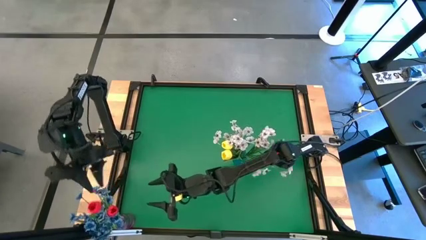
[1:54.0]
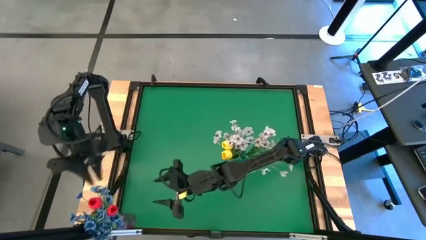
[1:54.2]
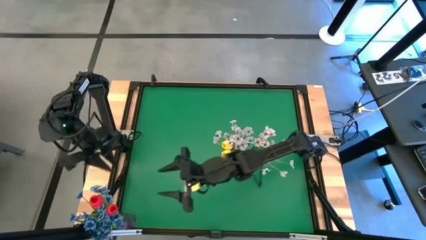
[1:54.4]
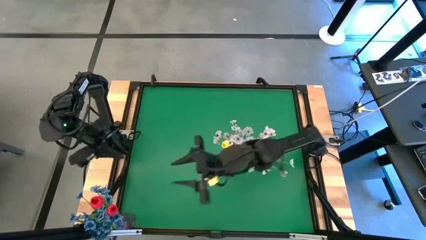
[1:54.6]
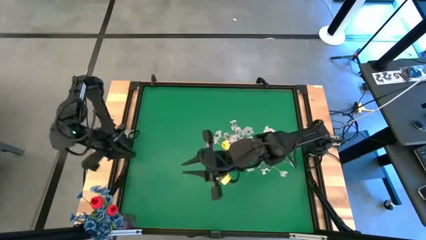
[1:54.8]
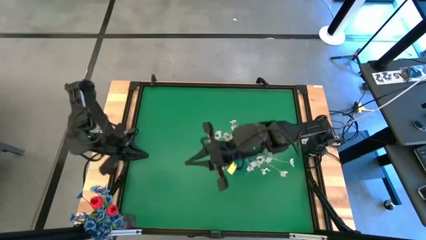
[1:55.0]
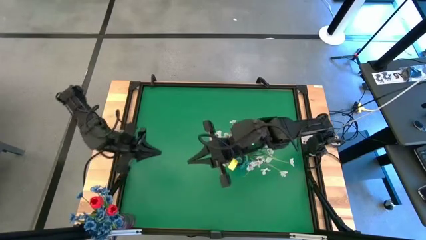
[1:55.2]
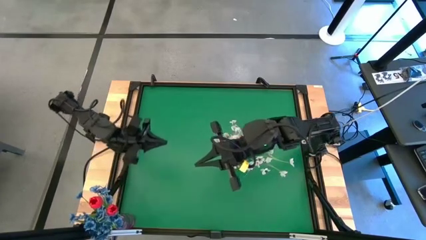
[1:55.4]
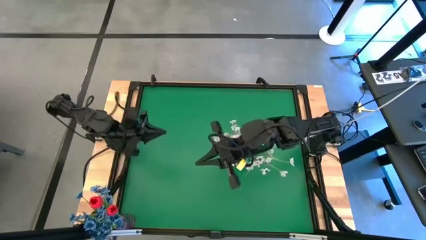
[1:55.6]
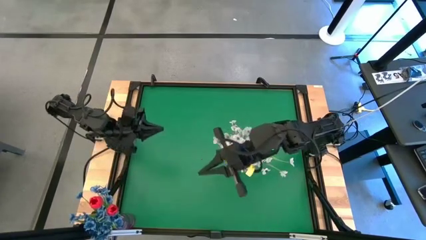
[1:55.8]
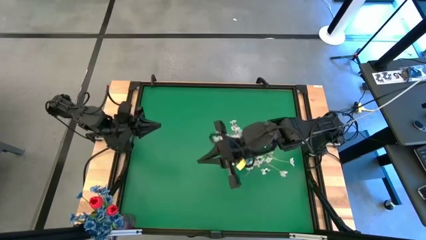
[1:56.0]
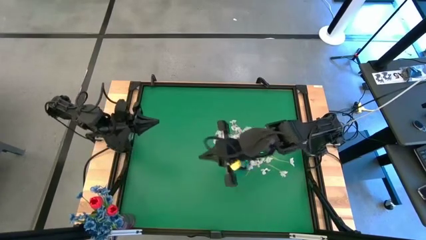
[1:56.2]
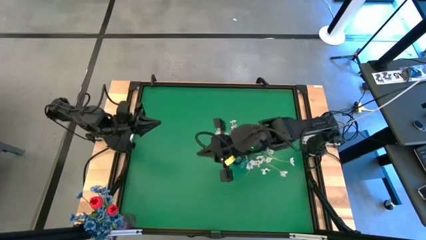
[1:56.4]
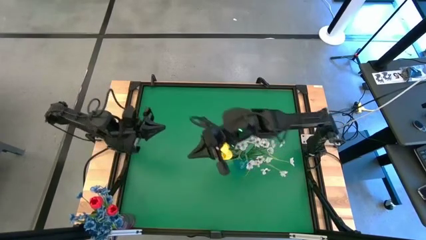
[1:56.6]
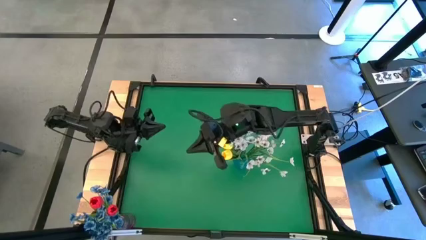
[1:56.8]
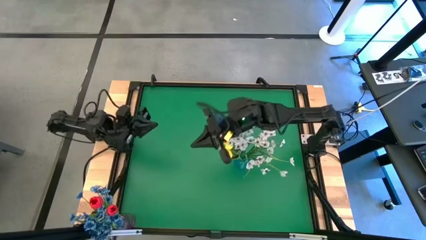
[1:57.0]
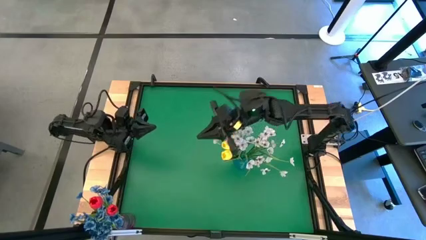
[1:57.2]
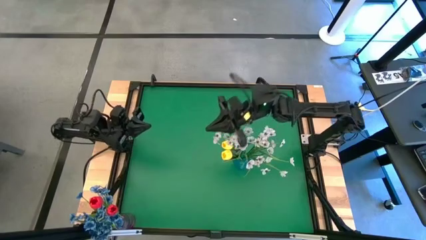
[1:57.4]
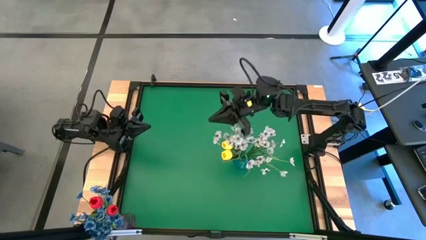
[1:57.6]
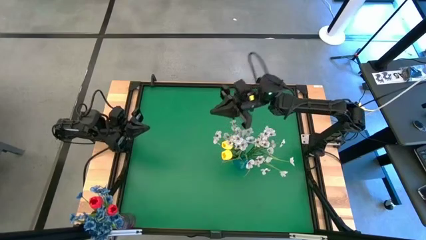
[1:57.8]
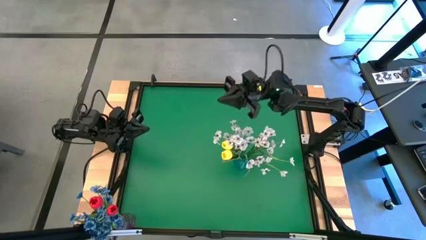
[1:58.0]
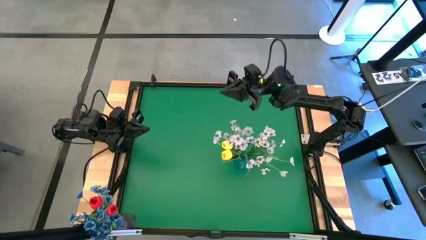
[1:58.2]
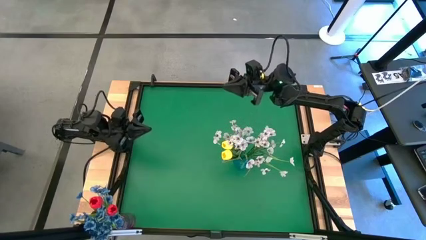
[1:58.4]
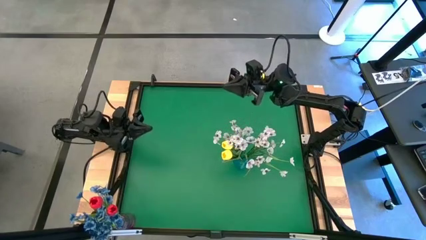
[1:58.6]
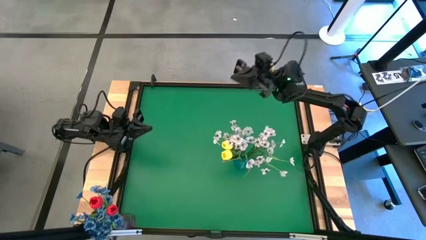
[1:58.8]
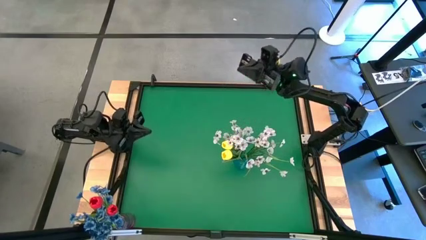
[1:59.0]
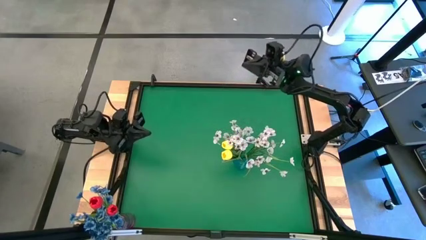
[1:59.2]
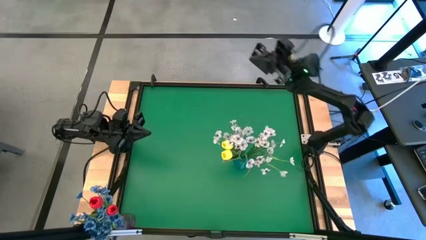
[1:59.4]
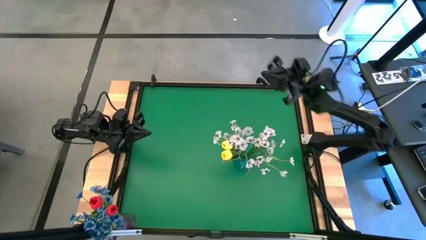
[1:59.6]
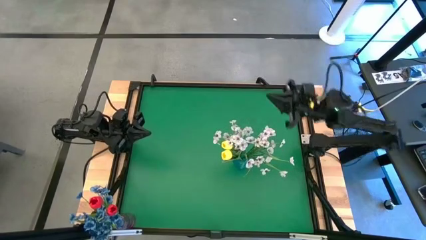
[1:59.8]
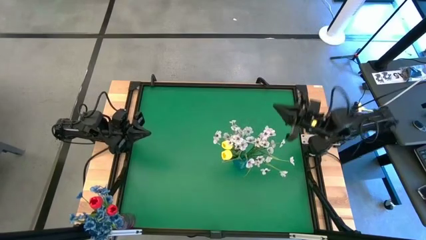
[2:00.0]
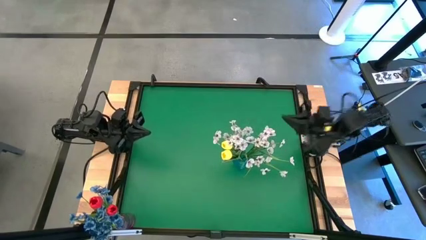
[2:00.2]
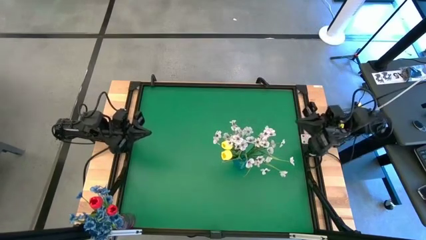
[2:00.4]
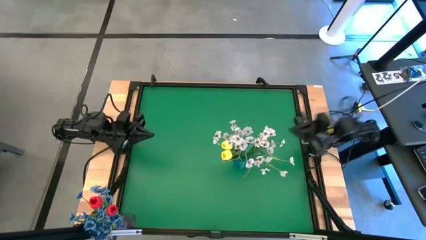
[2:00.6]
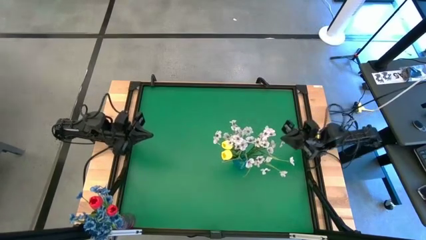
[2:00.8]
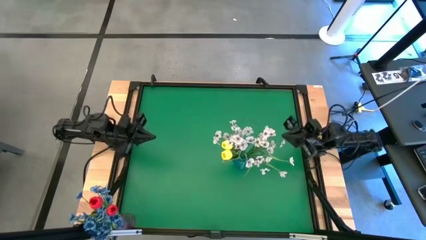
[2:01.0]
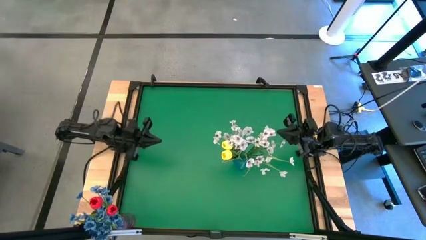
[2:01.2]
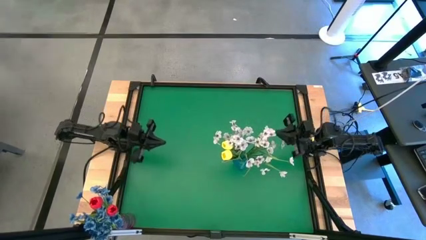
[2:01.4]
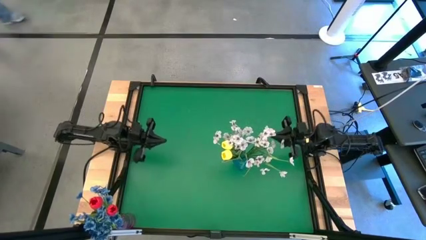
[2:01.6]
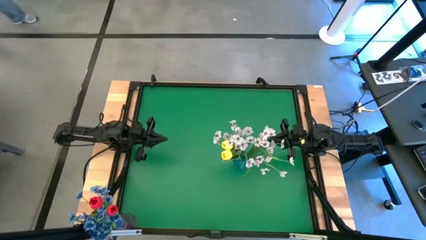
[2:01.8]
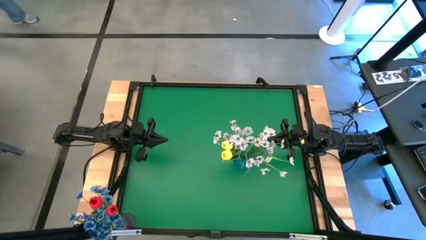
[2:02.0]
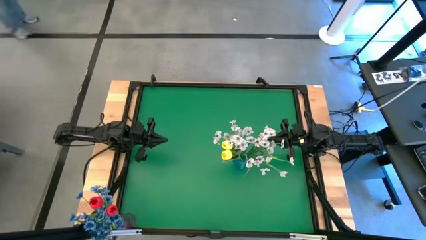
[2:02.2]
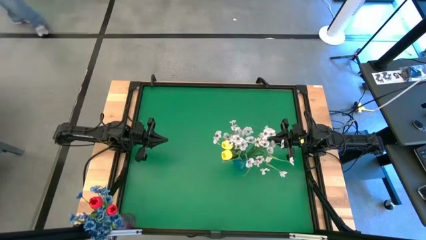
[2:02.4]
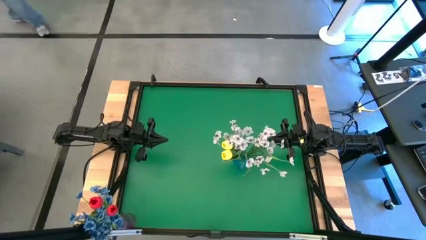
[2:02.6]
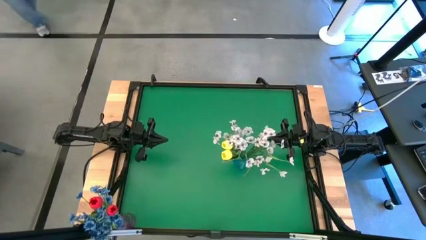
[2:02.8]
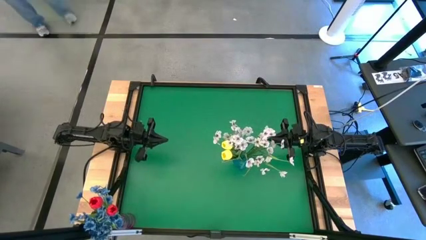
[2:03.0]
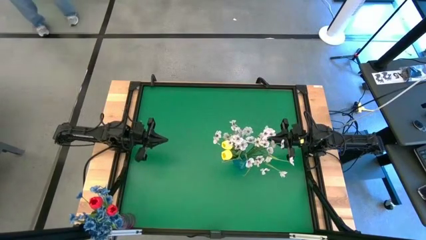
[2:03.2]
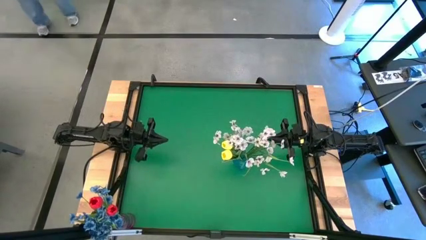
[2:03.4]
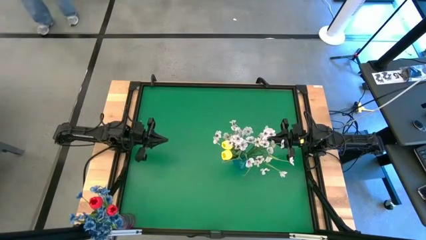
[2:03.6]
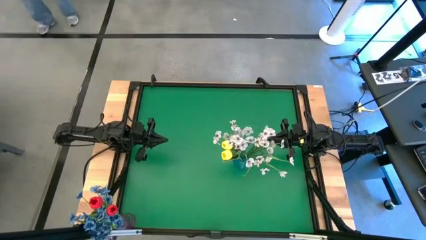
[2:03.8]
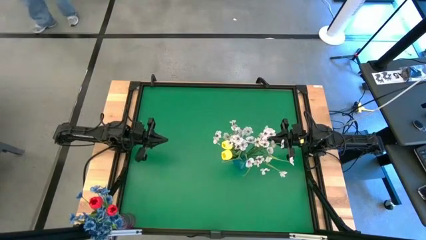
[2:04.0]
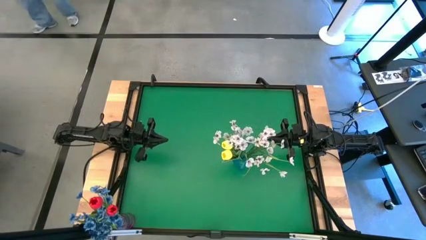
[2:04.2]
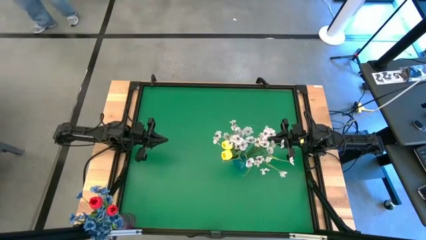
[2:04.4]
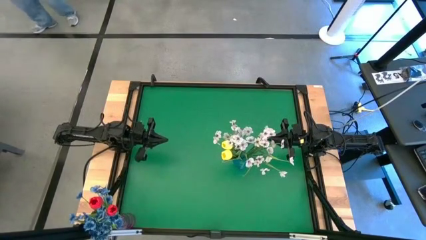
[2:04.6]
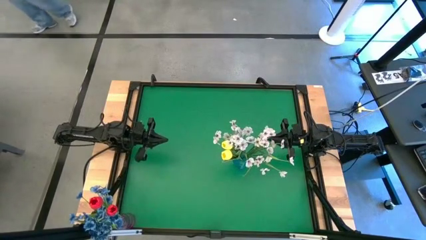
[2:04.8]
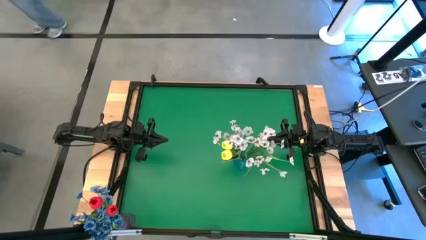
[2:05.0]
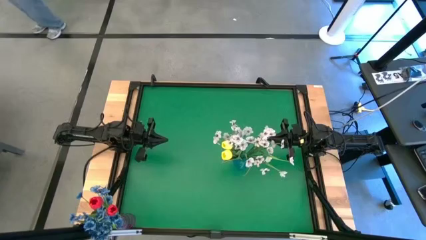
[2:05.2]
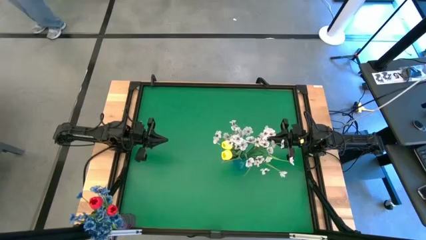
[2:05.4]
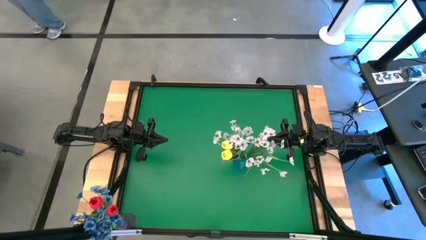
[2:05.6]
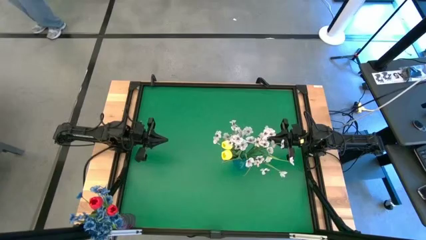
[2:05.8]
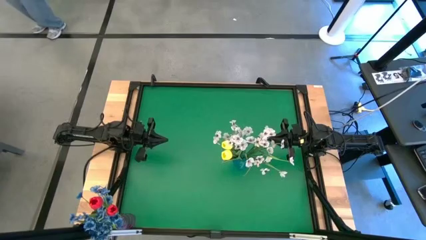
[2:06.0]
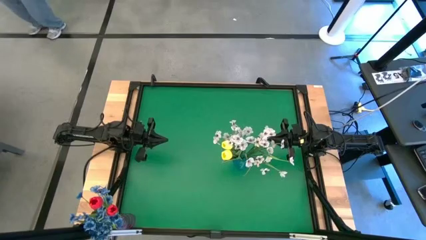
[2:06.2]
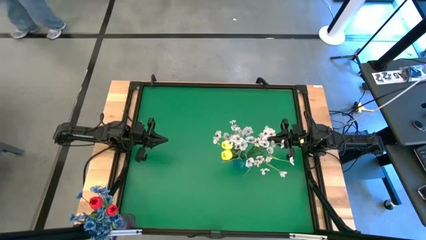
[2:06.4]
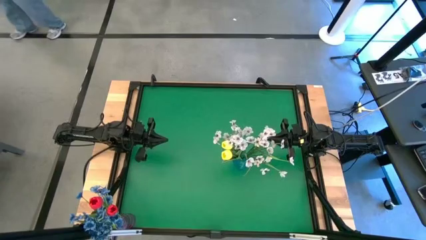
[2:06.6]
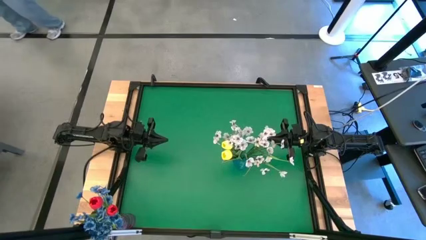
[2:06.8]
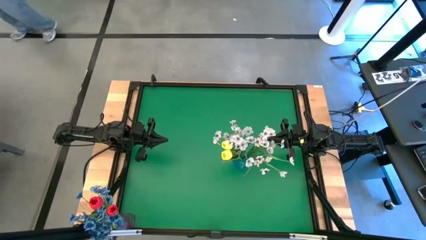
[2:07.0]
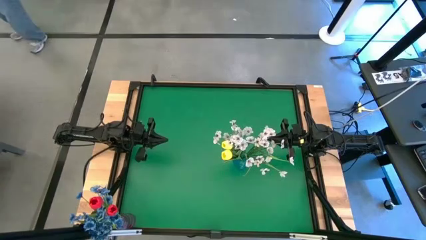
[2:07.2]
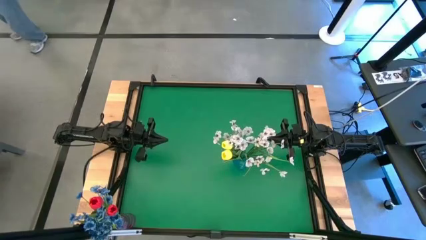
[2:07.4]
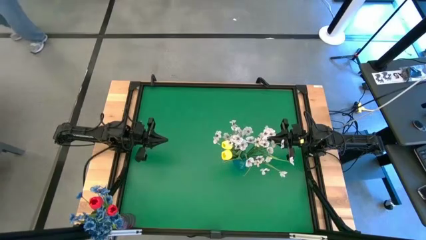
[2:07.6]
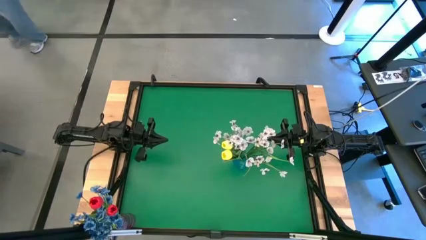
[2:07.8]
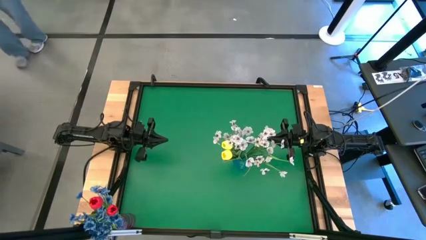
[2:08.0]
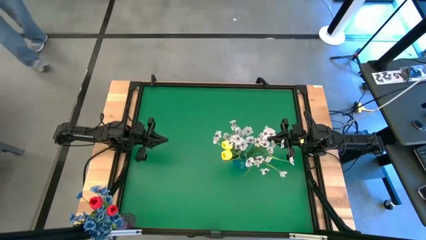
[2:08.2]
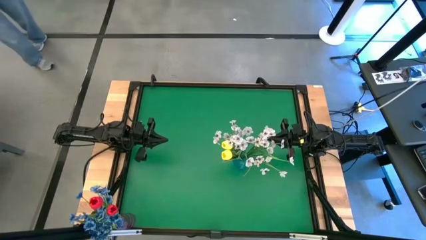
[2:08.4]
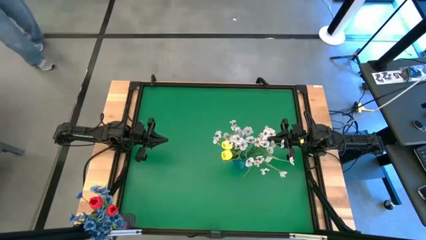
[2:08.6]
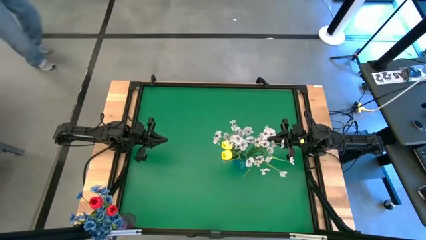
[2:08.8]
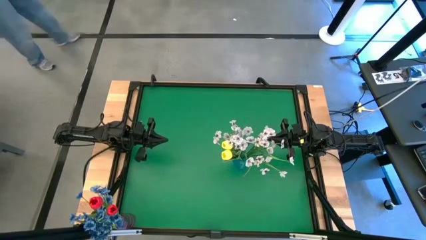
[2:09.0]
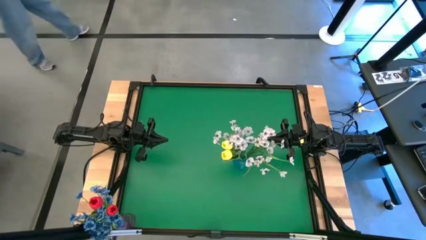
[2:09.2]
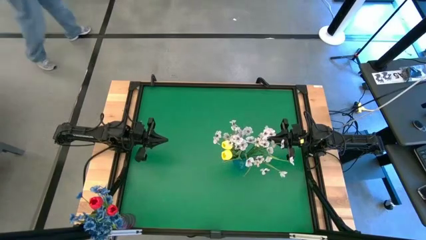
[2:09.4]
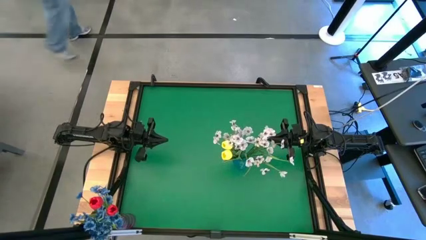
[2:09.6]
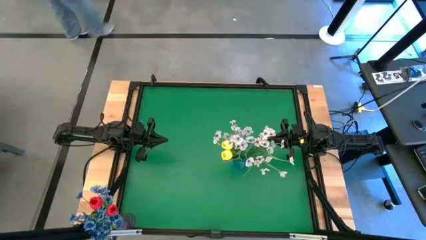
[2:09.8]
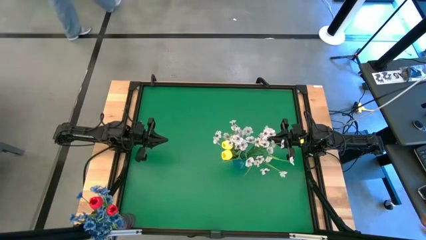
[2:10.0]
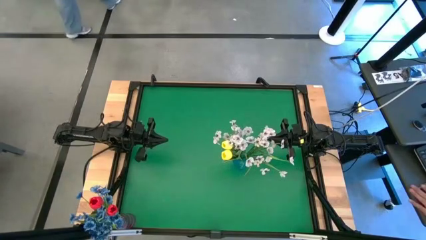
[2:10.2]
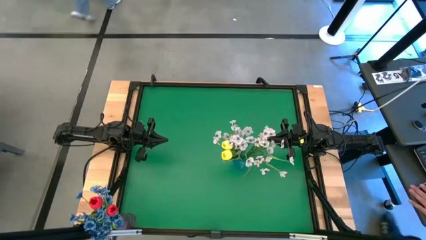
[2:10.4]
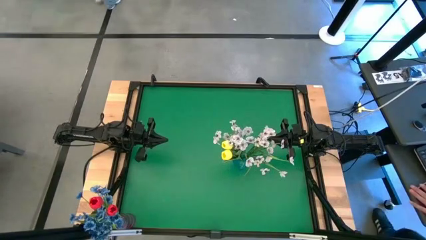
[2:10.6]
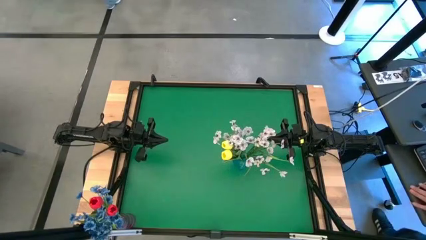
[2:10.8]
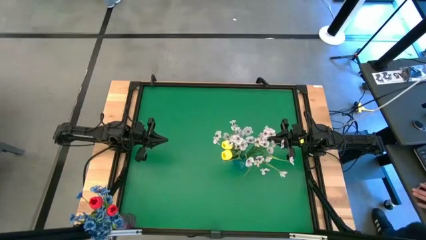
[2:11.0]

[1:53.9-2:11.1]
Task: Sort flowers into vase by color
Return to Home Position
